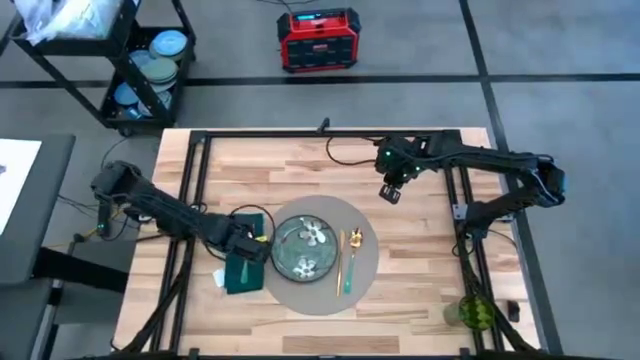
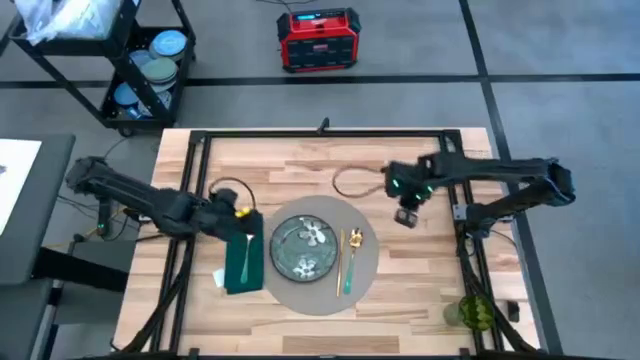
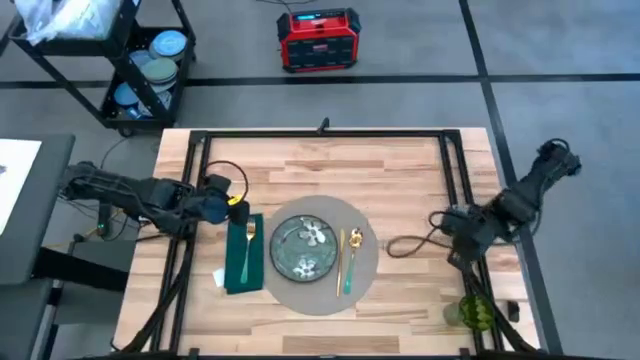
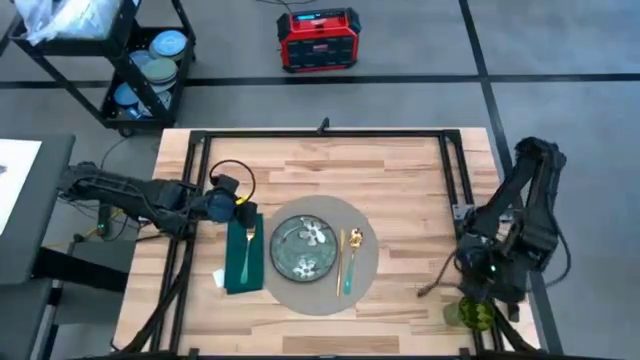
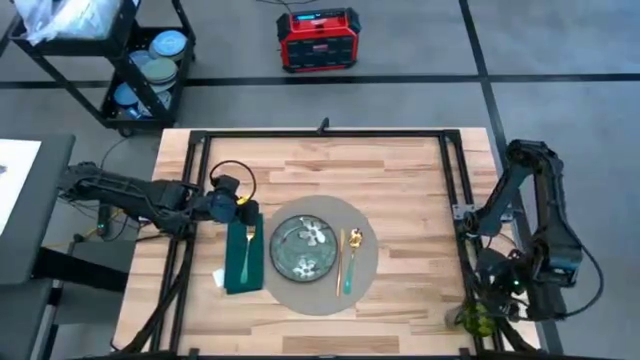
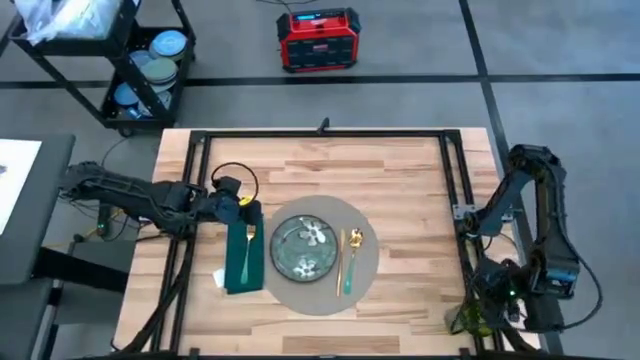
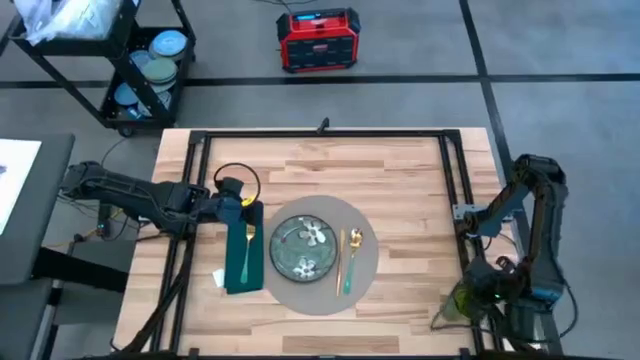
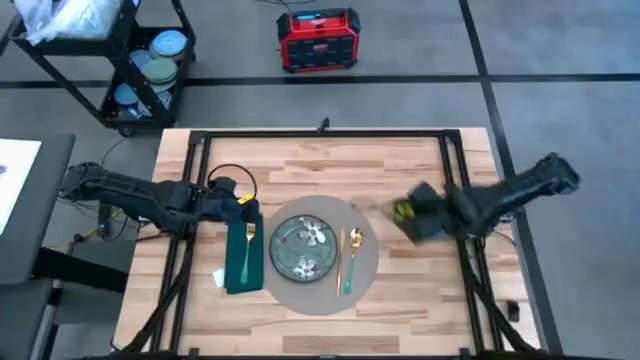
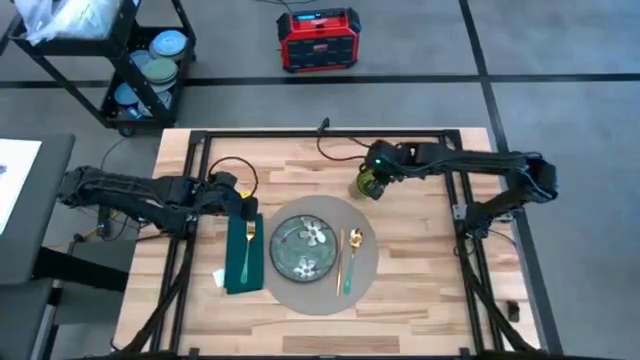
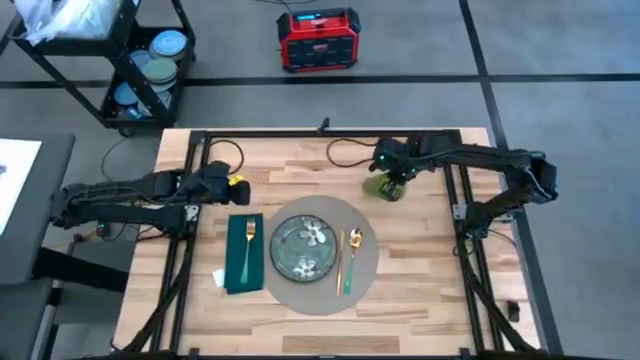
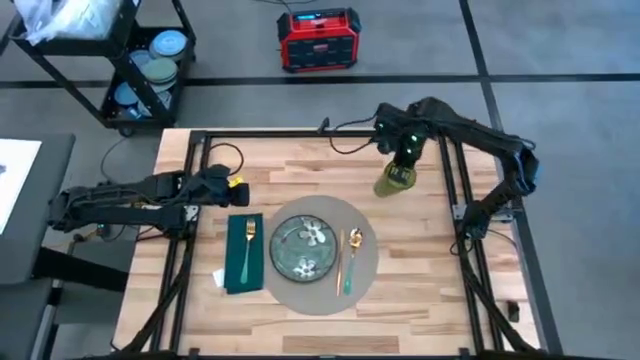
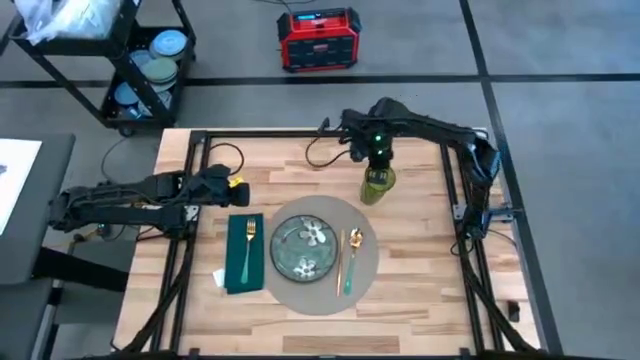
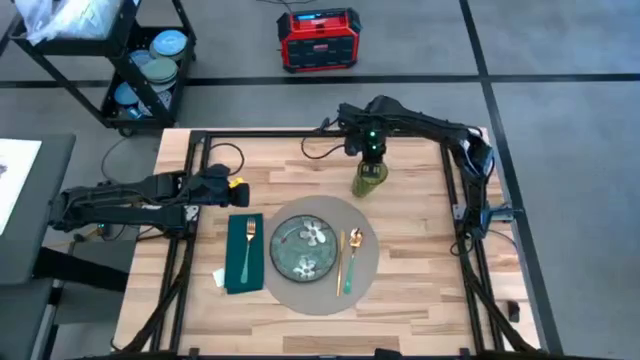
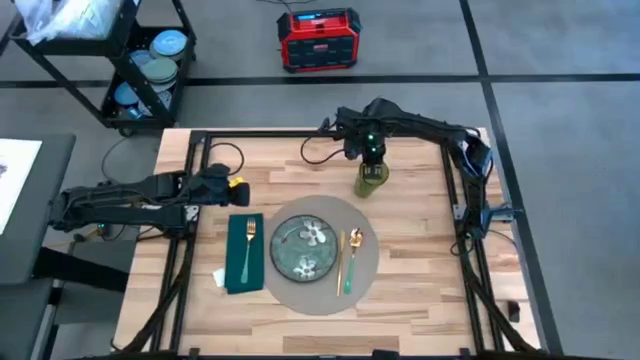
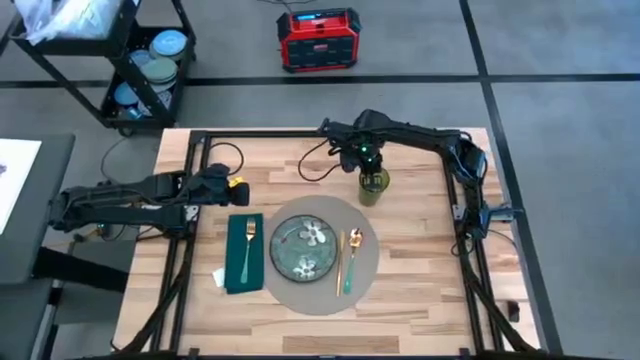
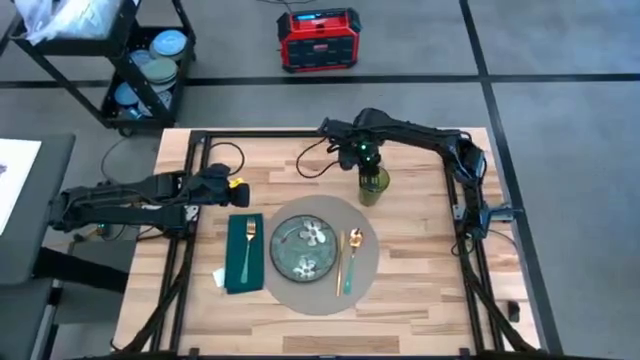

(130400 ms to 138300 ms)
Task: Set table place
Put the green glass on the upper right side of the gray placemat

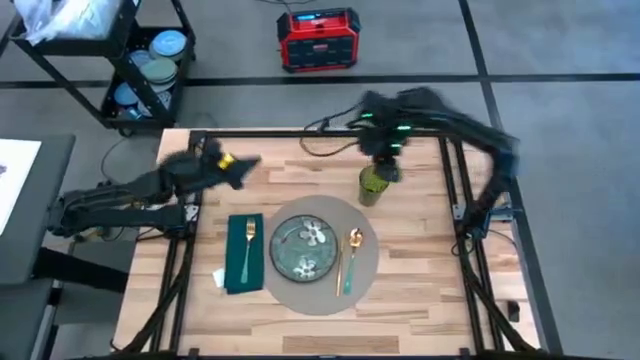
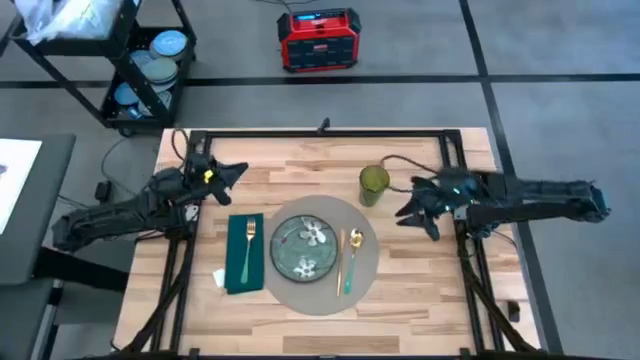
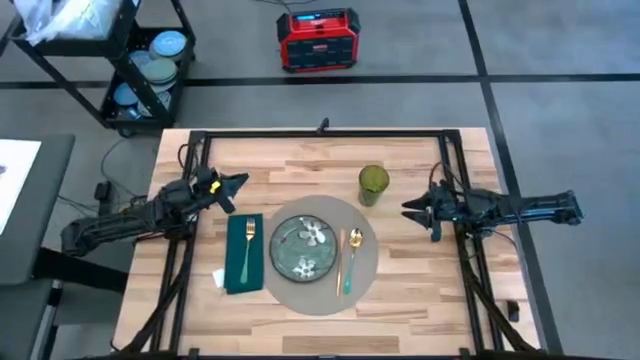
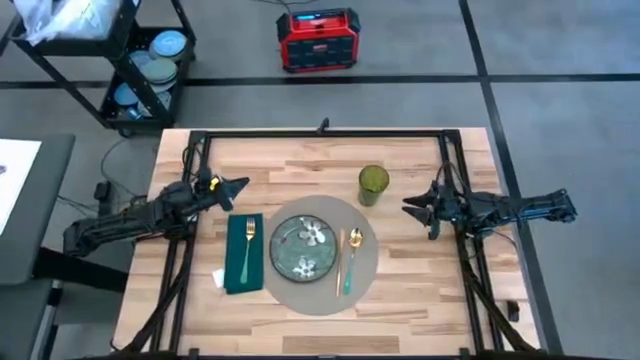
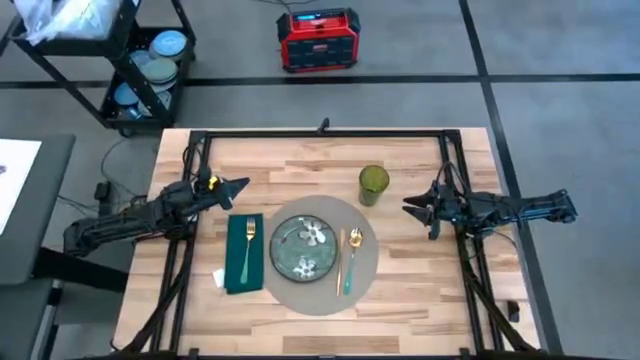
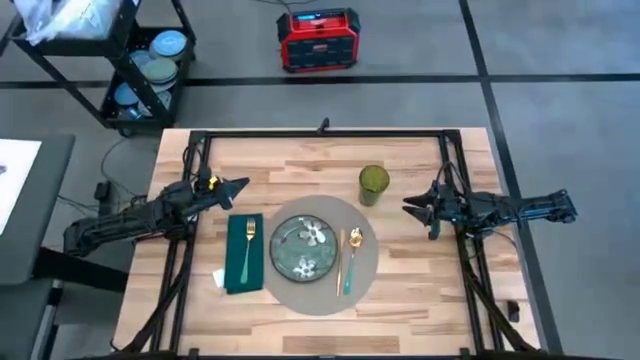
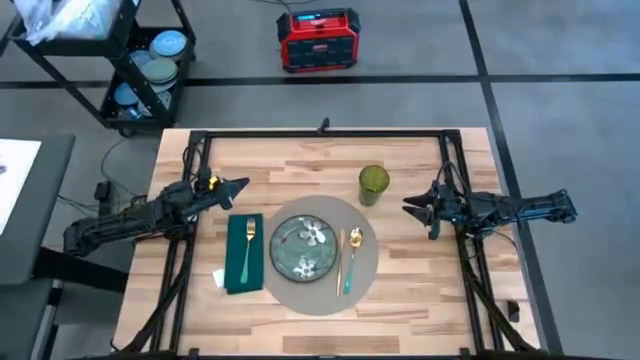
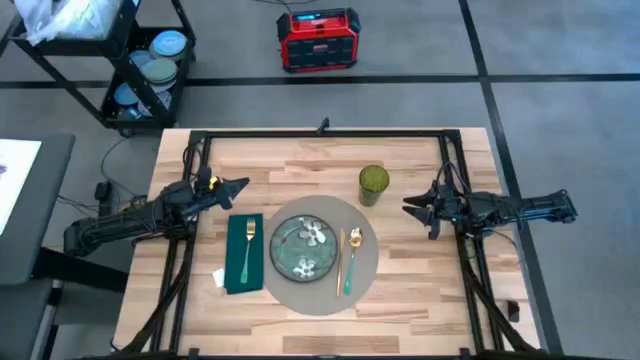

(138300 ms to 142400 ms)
Return to Home Position

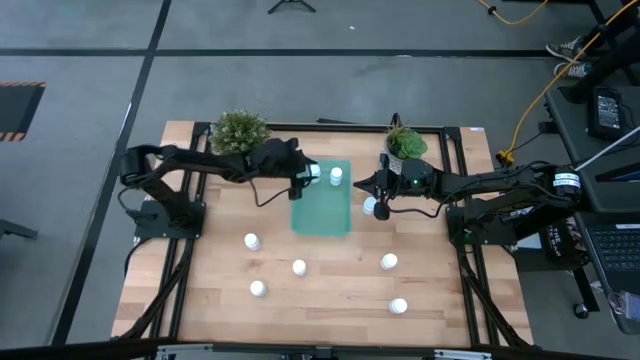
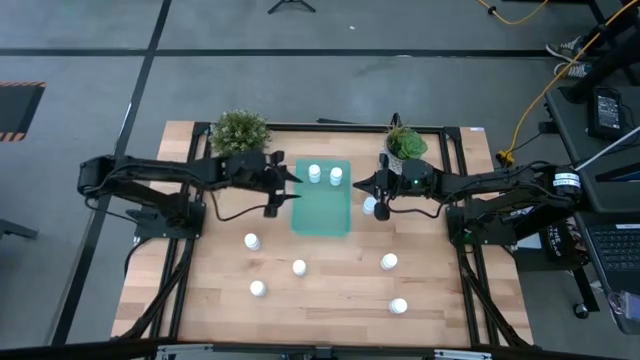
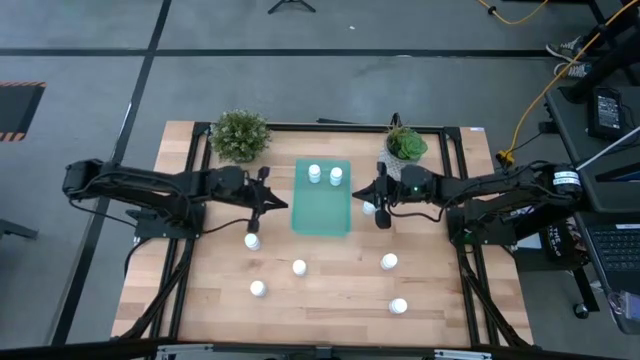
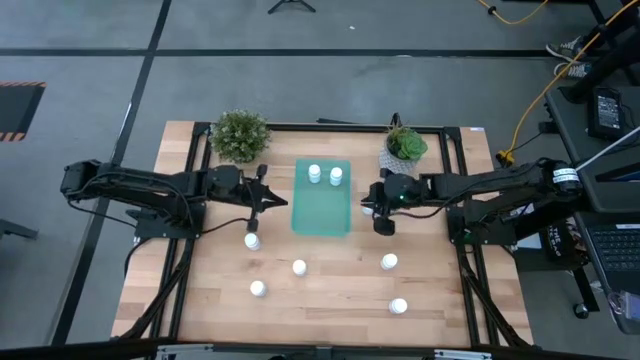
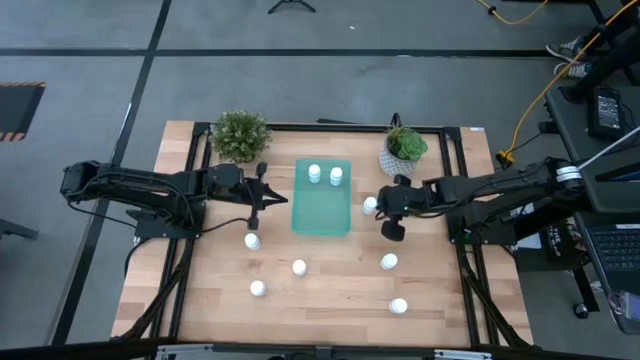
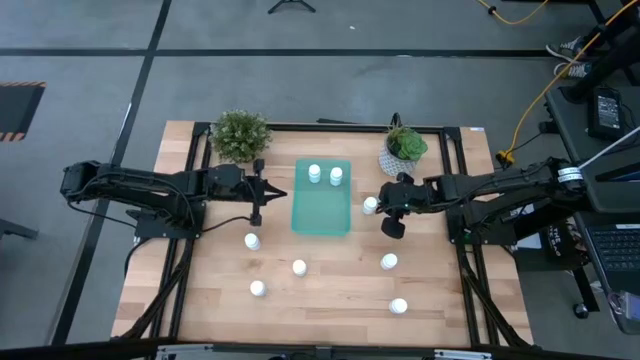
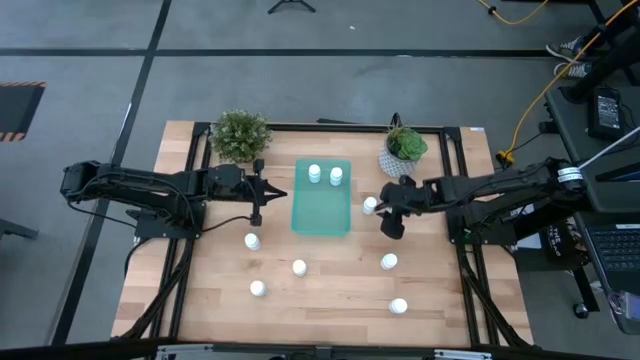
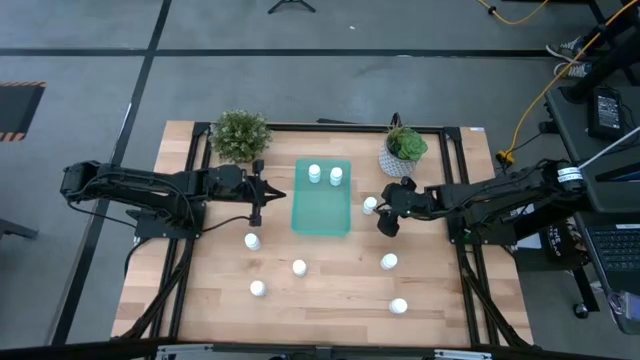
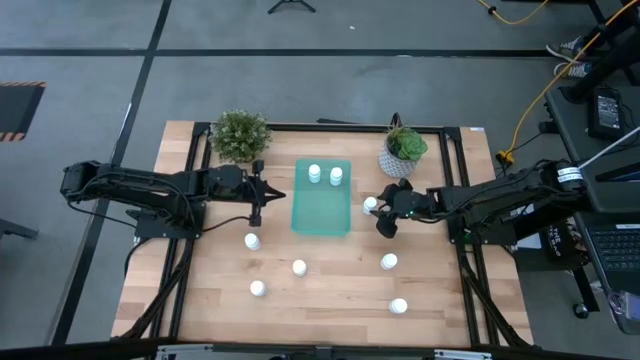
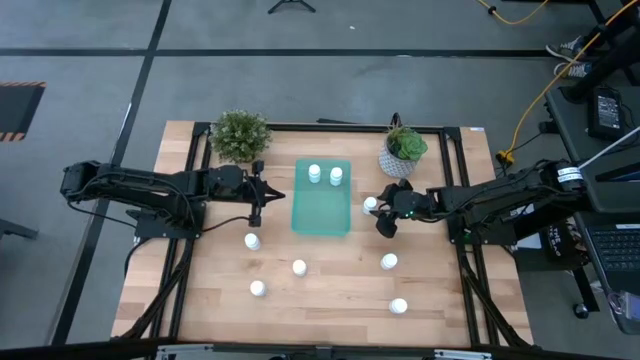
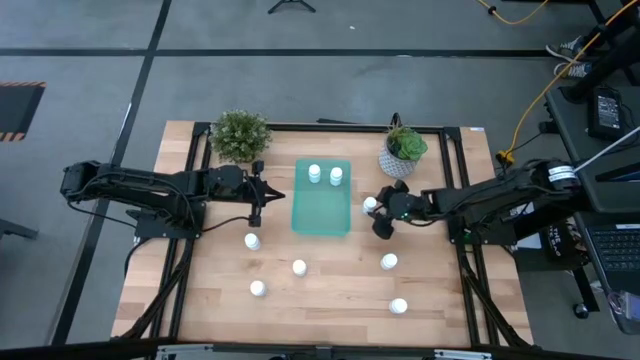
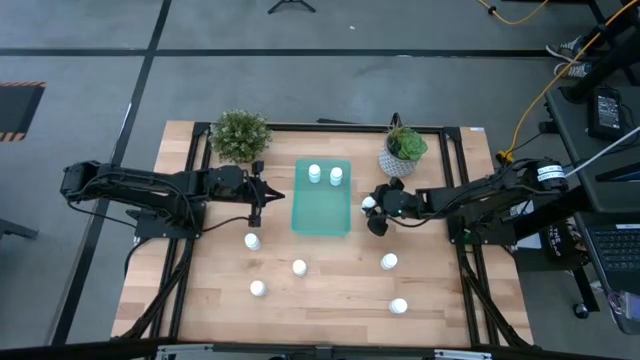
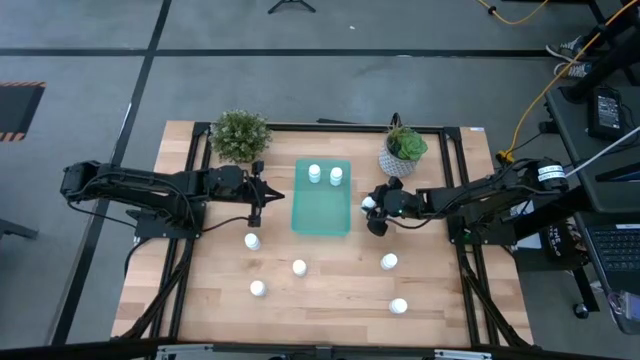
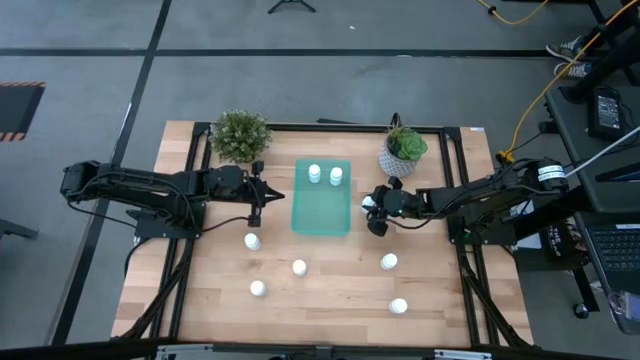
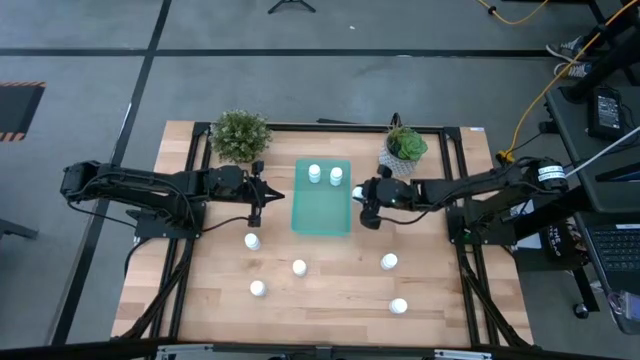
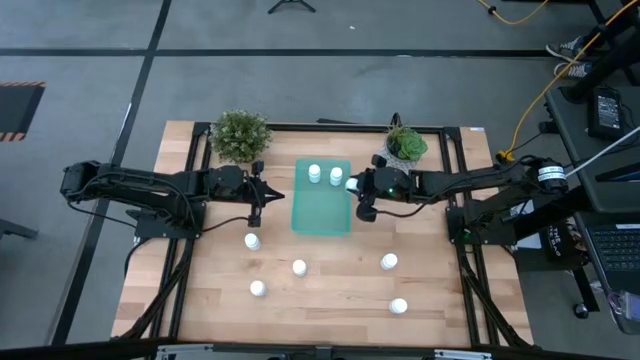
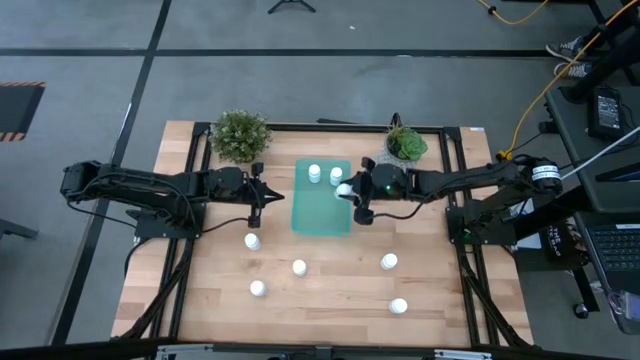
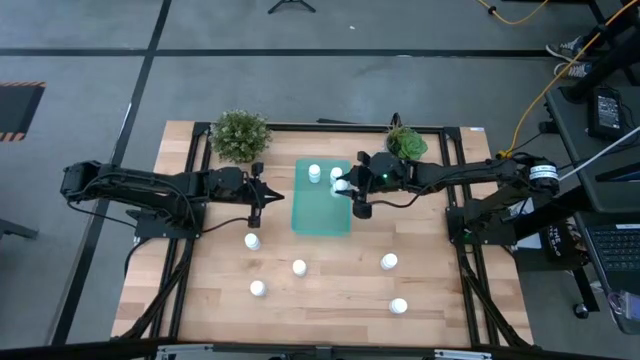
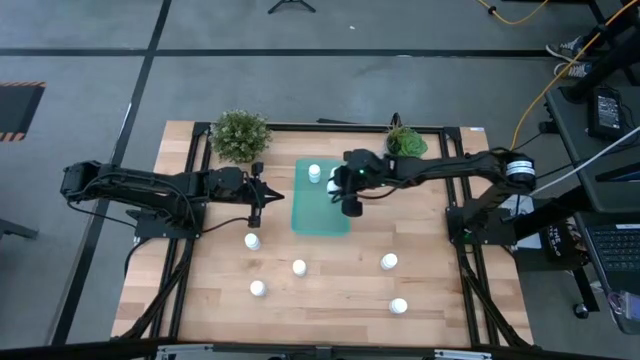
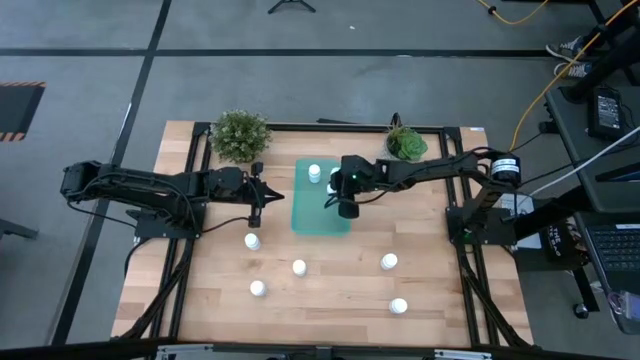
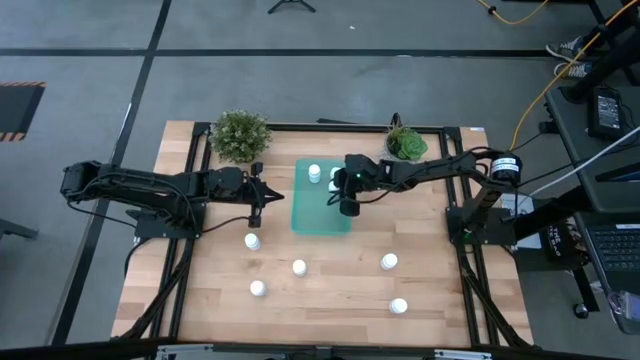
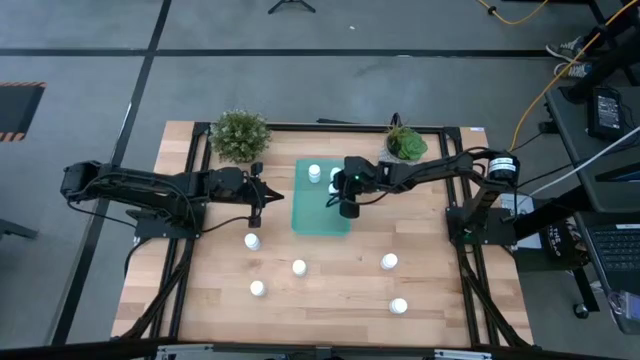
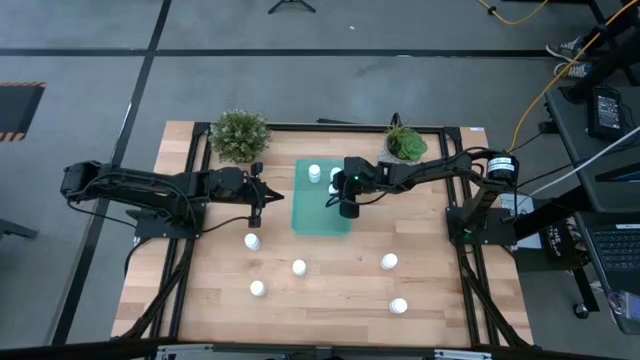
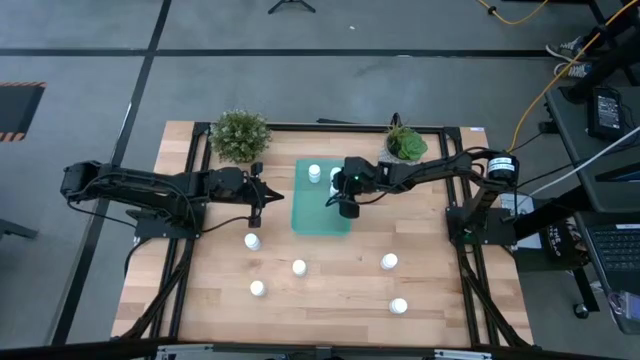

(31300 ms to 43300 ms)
Task: Pick and place pill bottles into a basket
Put the white pill bottle into the green bin
